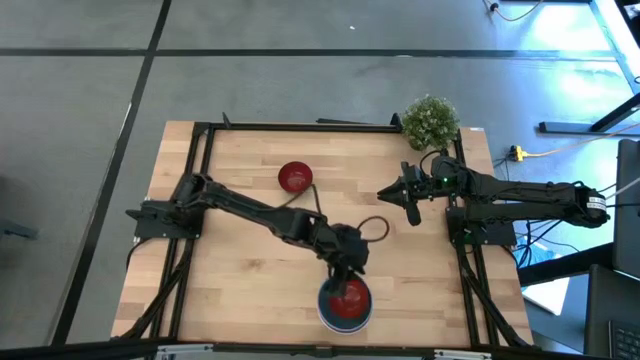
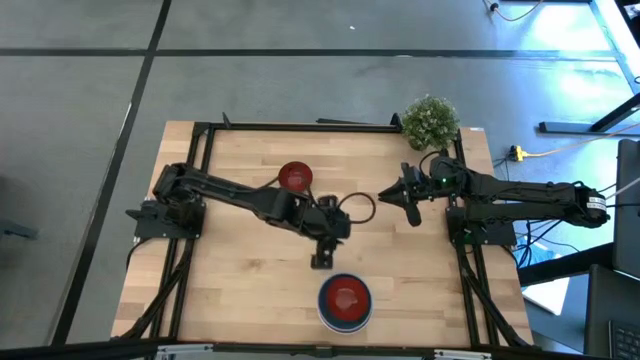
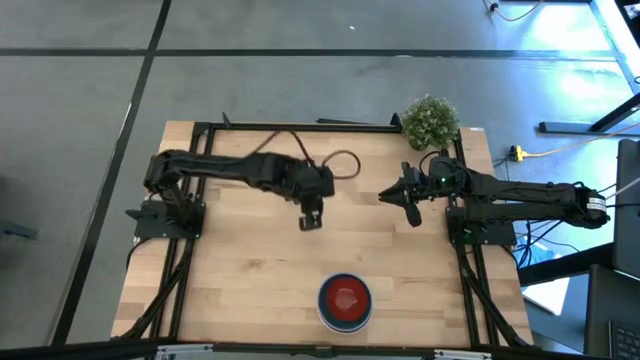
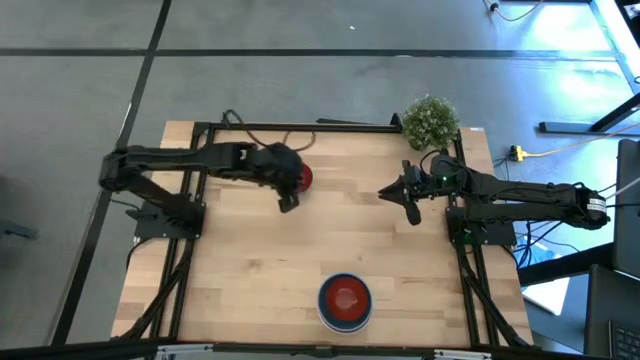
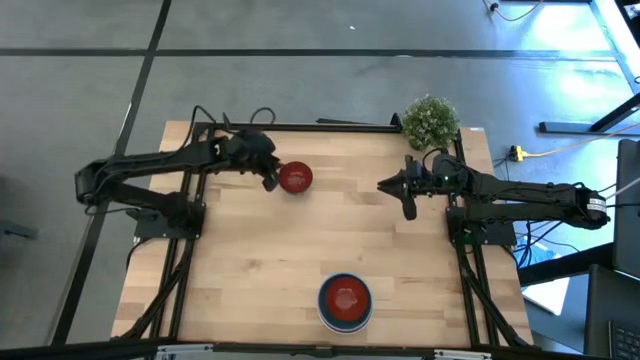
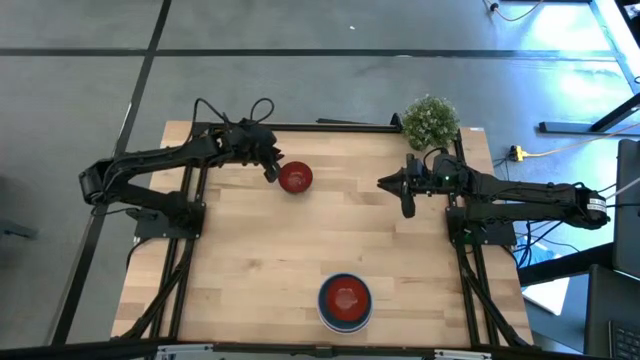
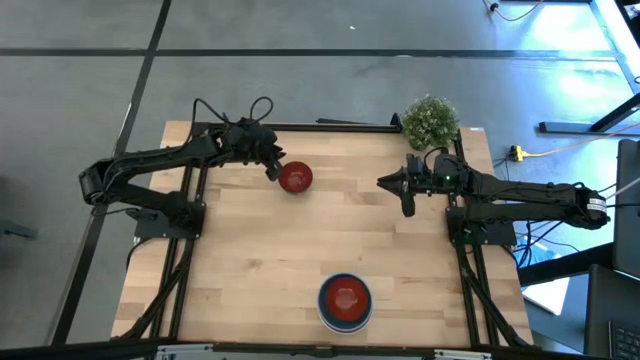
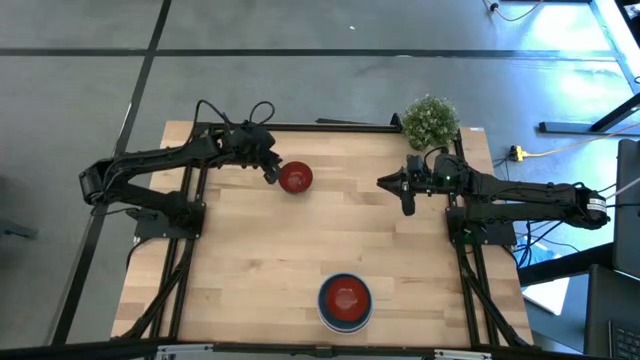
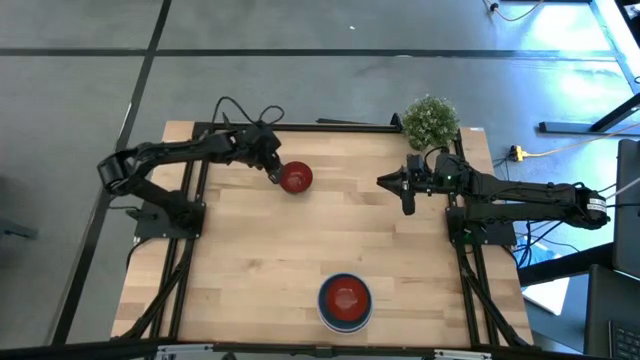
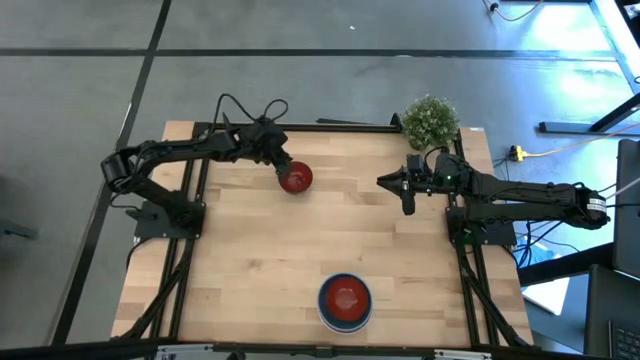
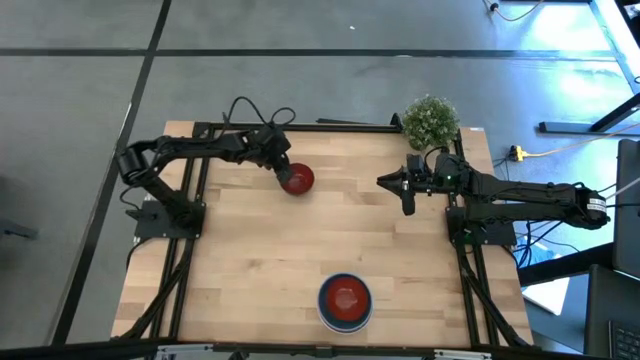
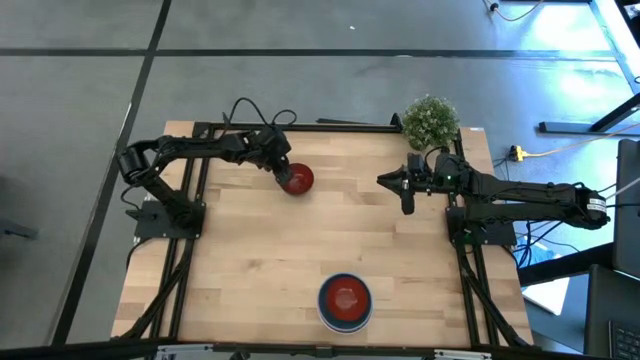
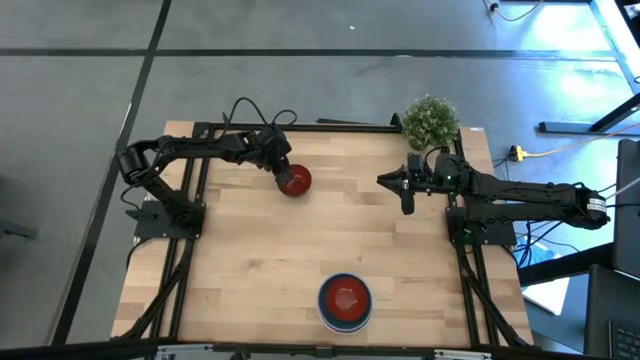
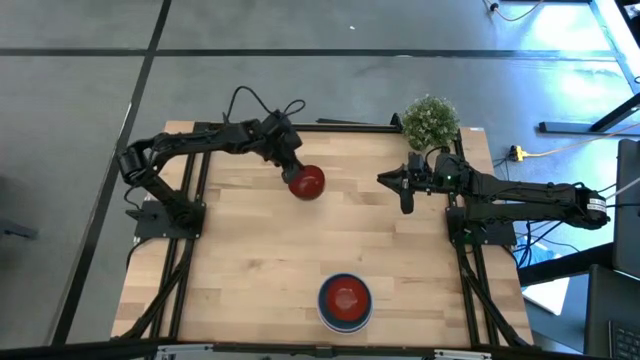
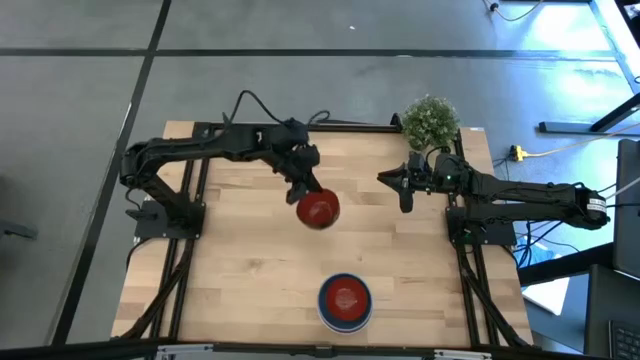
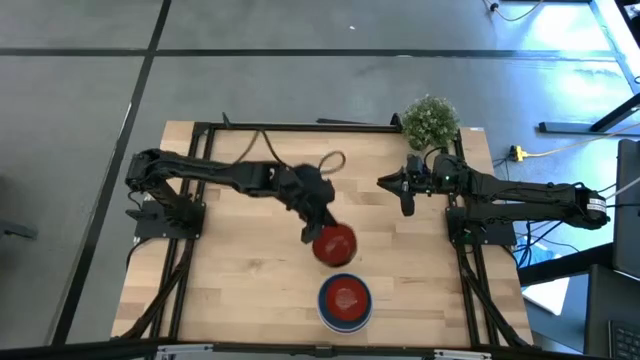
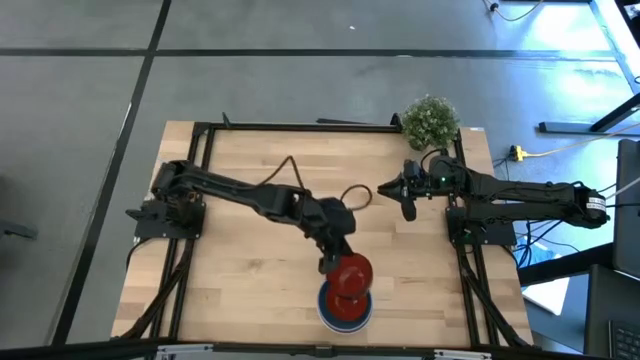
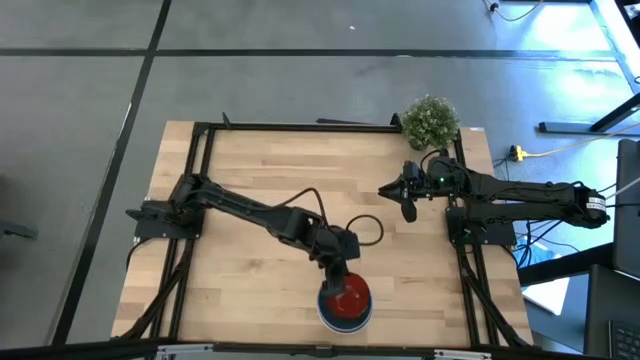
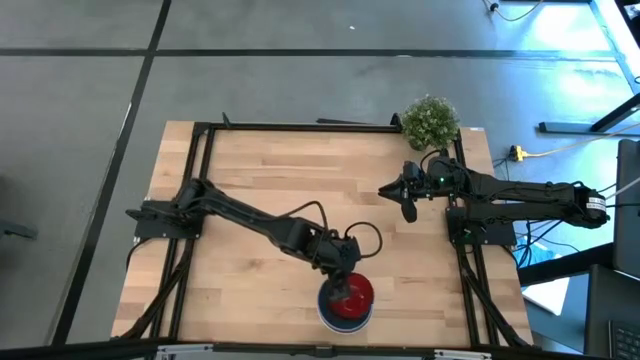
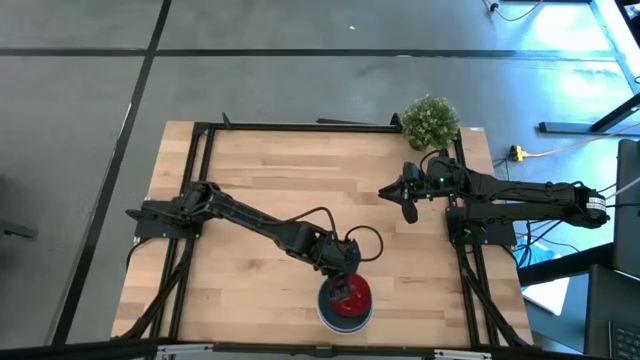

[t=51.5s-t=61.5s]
Task: Nest bowls inside each other
Stack the red bowl on the black bowl

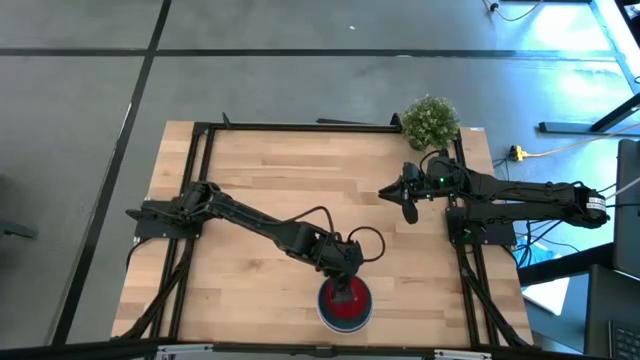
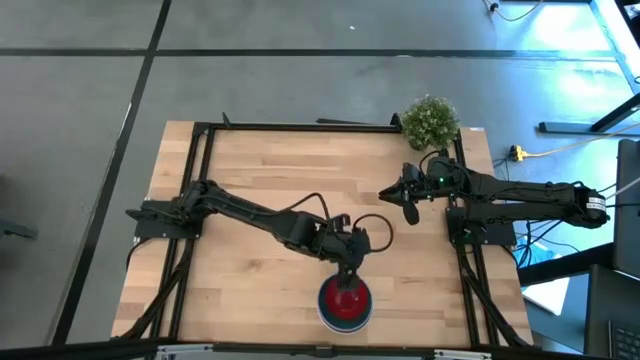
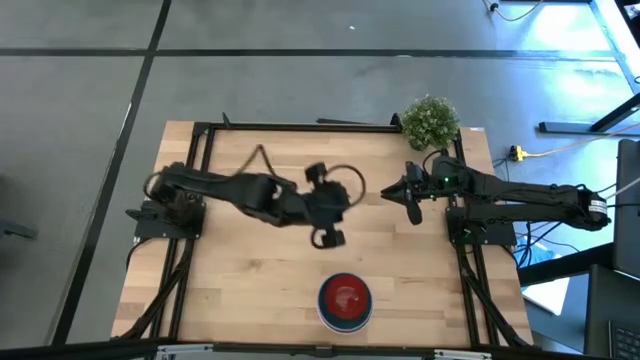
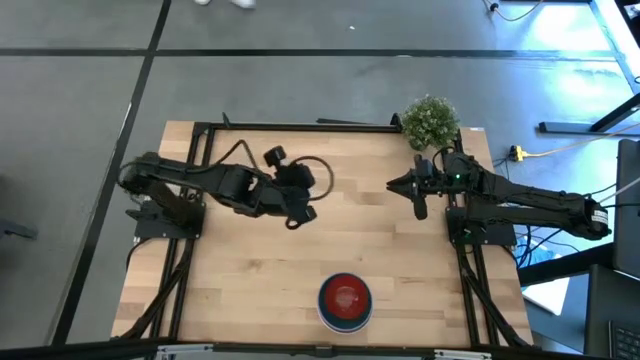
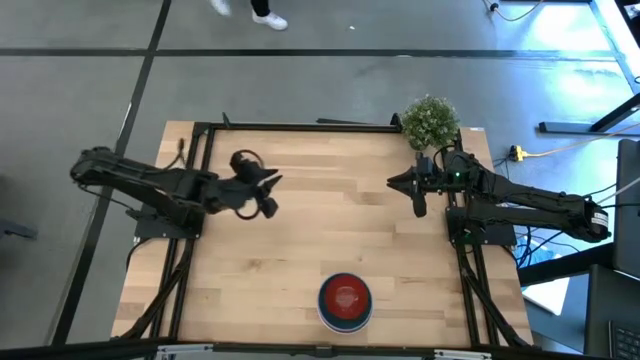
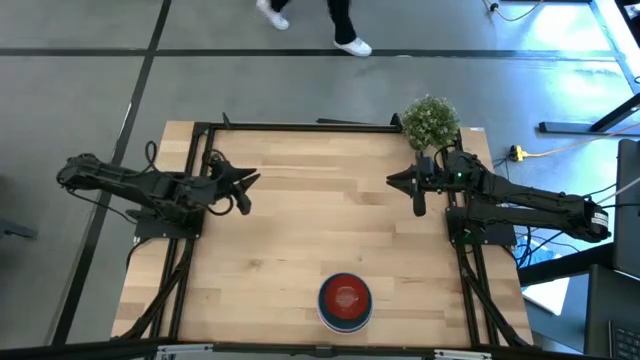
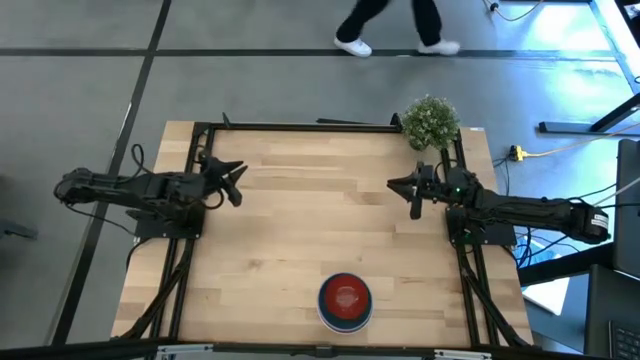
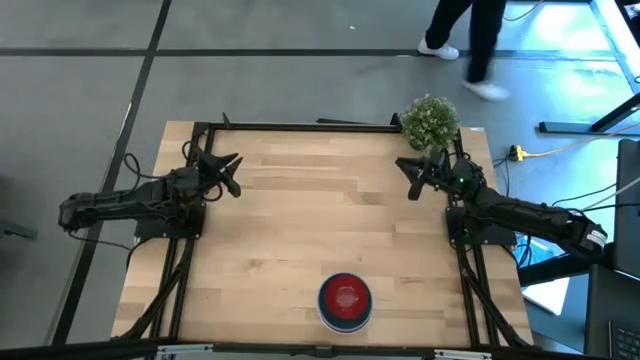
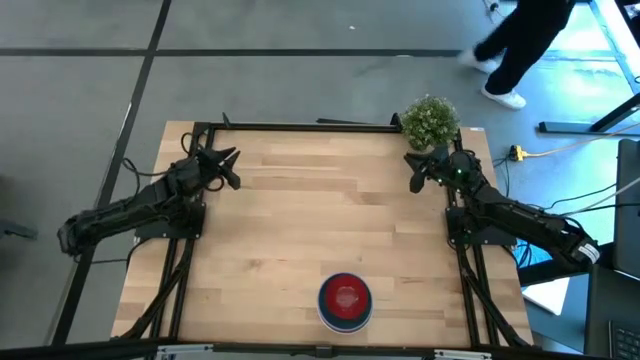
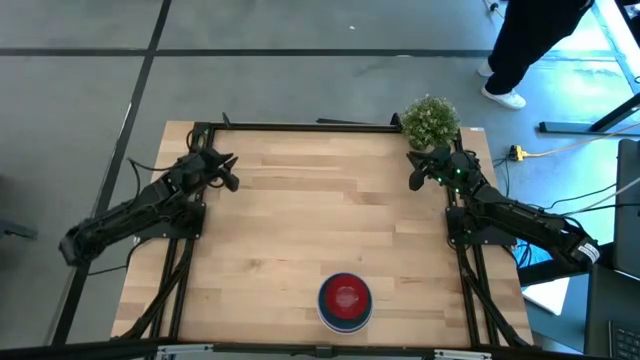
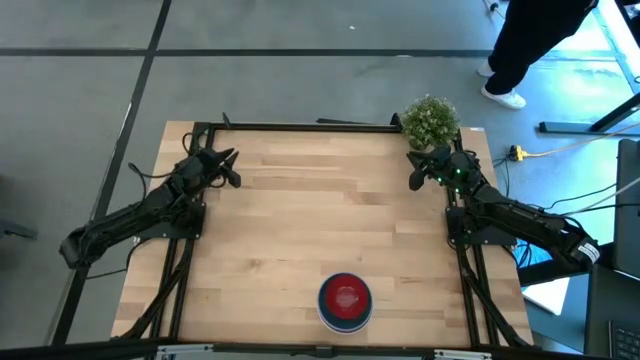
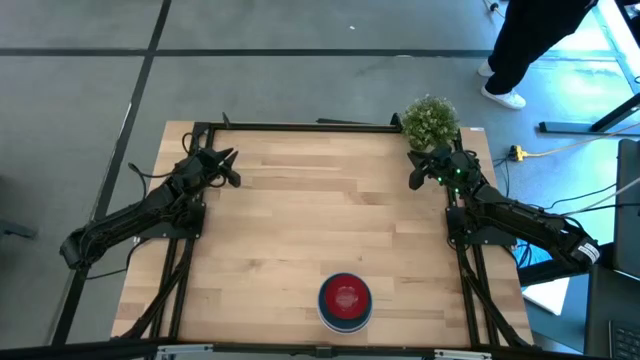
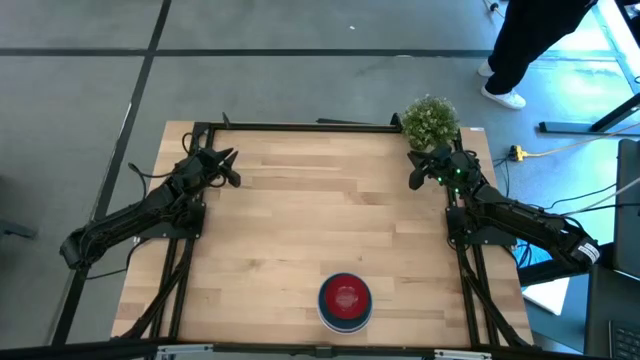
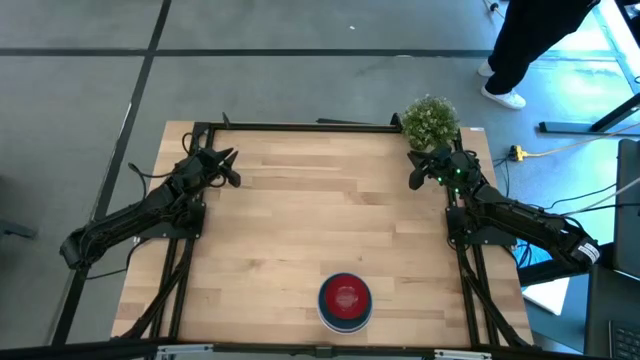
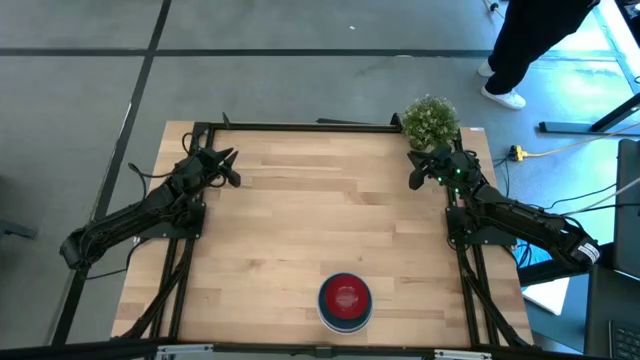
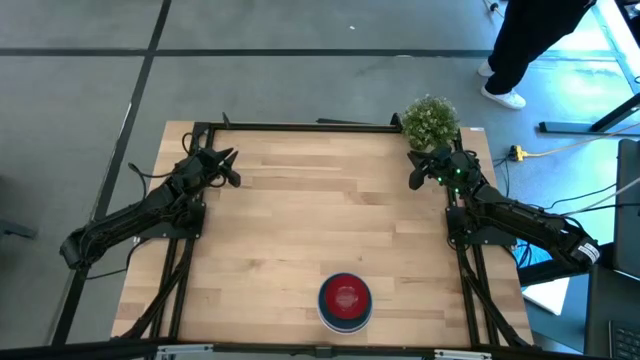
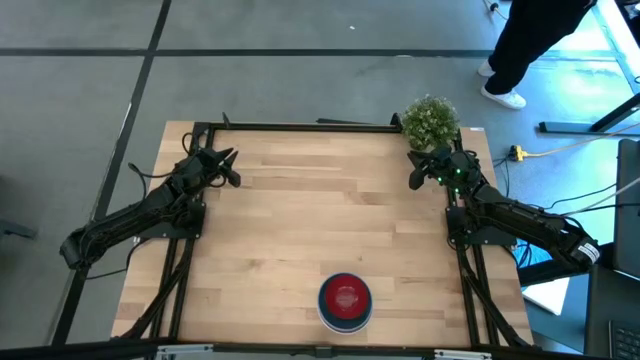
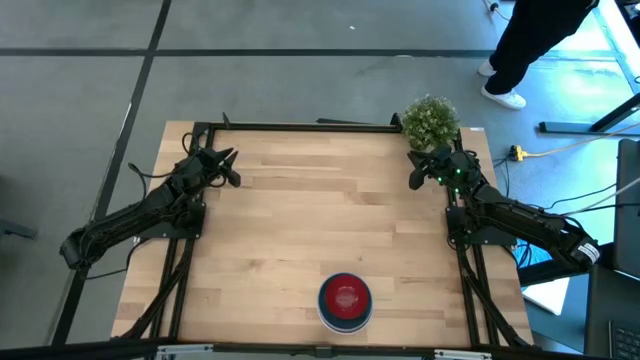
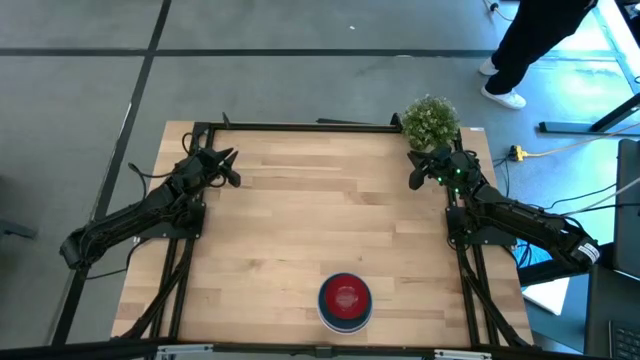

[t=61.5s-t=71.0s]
Return to Home Position
